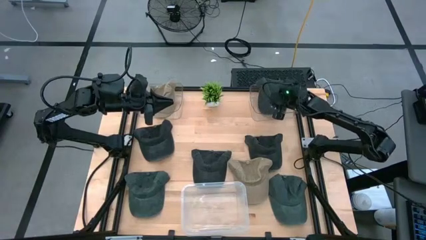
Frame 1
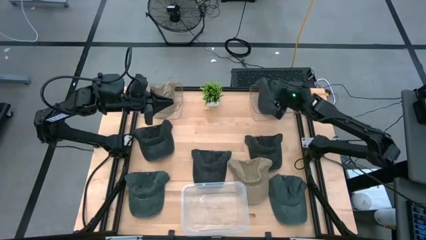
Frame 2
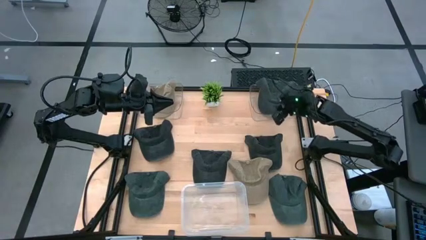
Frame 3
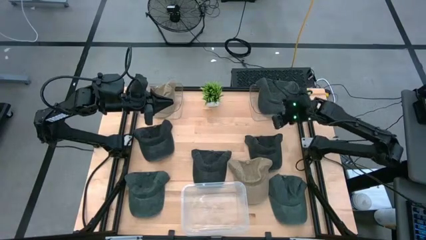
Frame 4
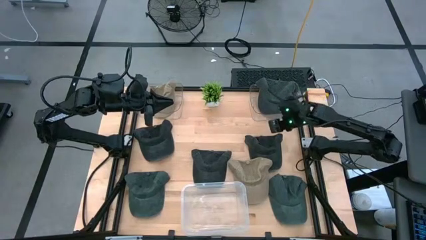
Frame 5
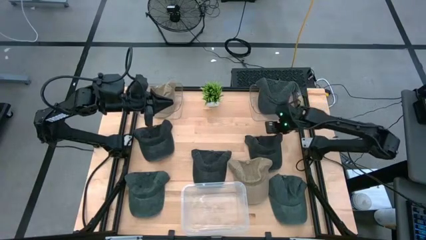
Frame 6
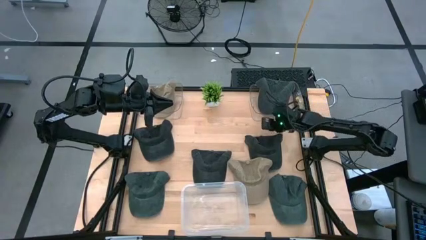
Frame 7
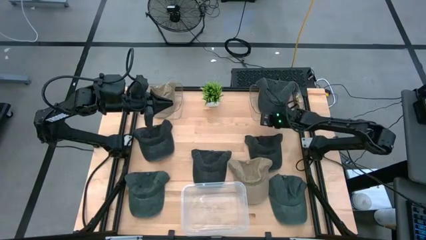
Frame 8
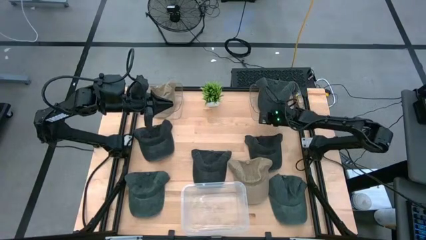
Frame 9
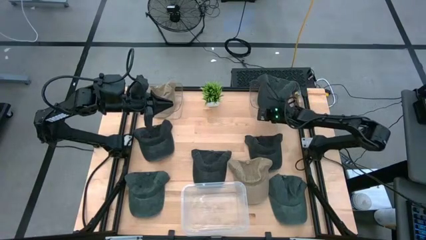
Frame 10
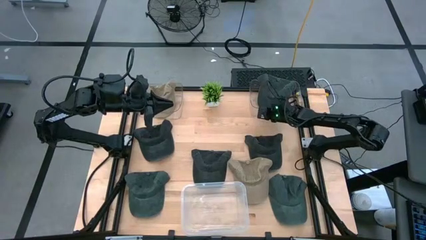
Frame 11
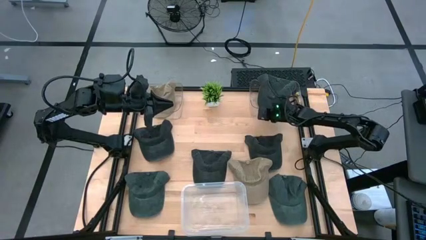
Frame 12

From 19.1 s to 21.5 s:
Task: Pick & Place hat
Adjust the right transparent bin

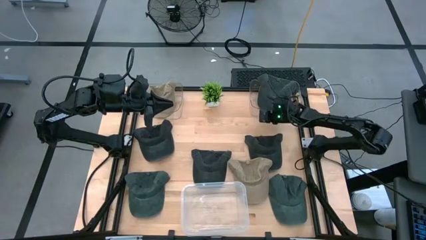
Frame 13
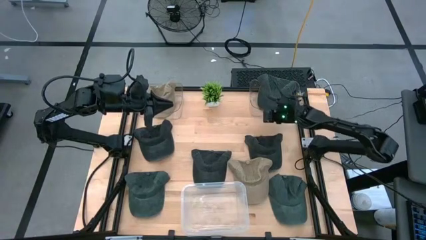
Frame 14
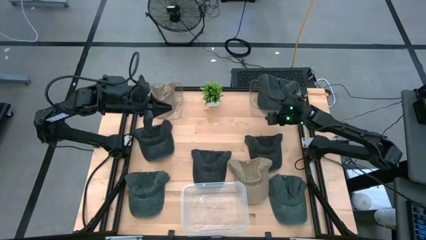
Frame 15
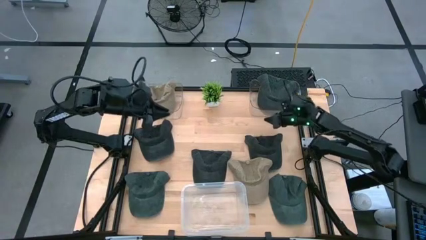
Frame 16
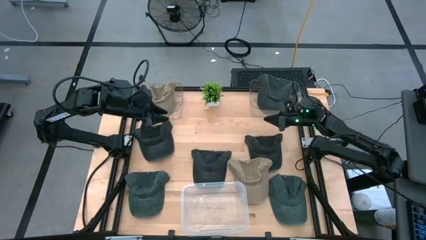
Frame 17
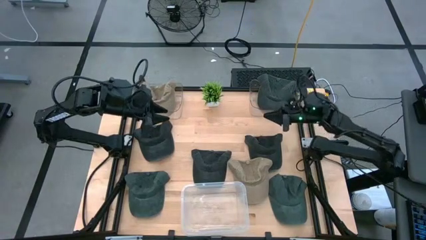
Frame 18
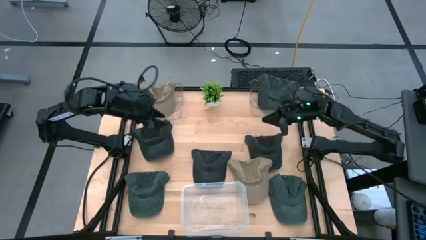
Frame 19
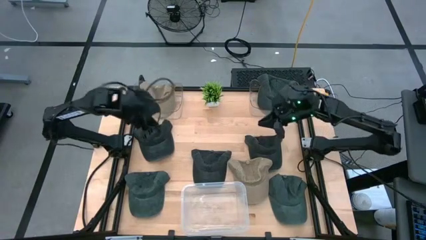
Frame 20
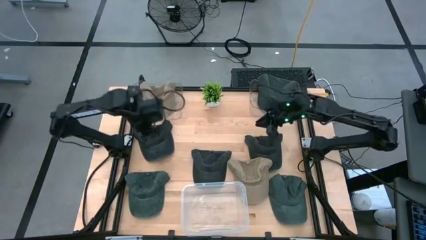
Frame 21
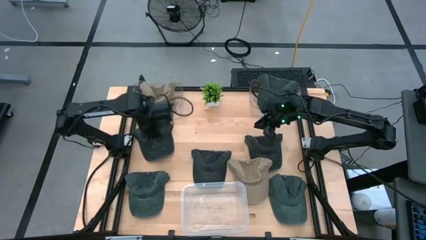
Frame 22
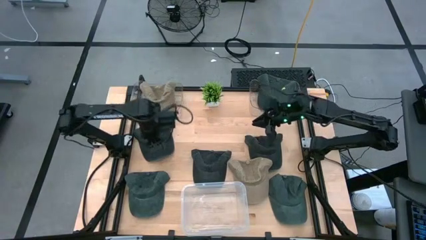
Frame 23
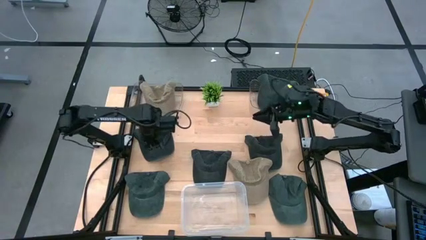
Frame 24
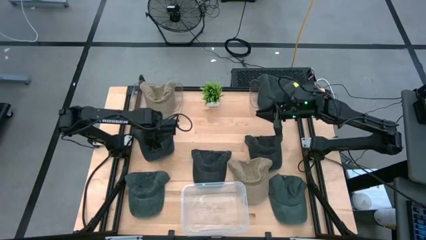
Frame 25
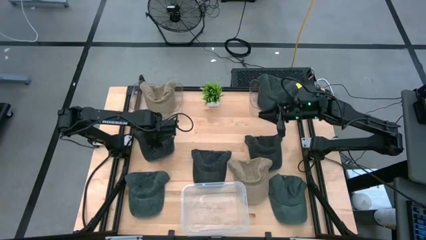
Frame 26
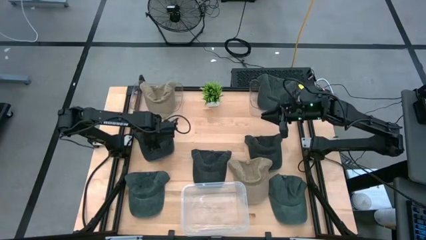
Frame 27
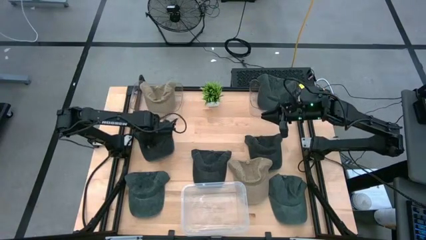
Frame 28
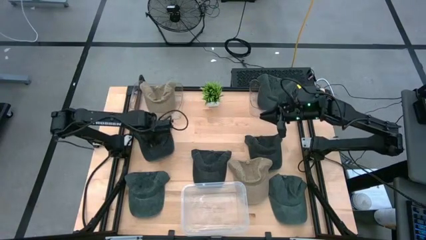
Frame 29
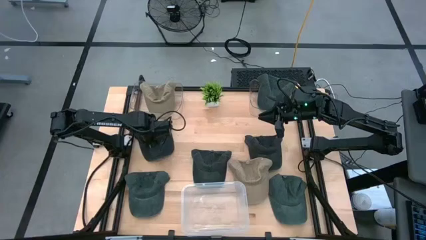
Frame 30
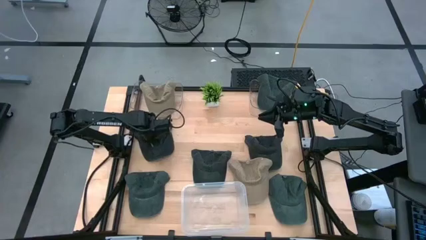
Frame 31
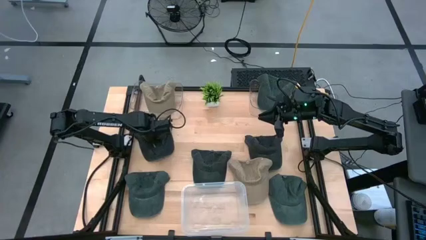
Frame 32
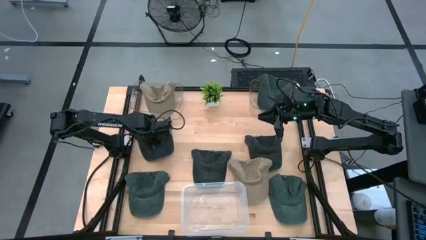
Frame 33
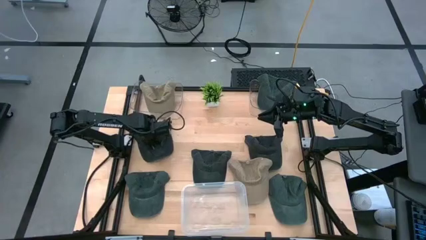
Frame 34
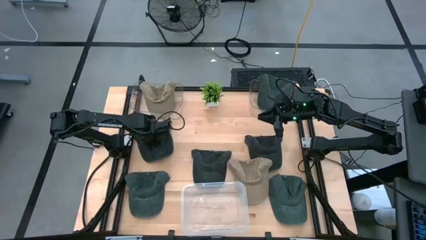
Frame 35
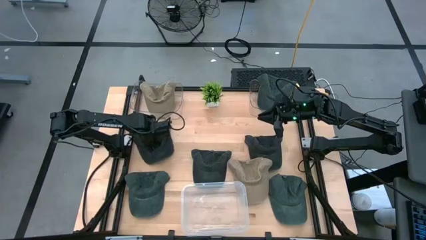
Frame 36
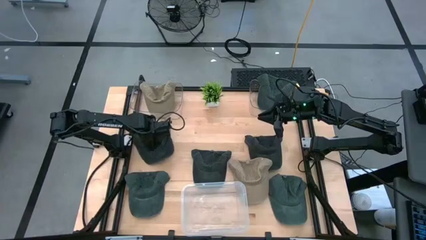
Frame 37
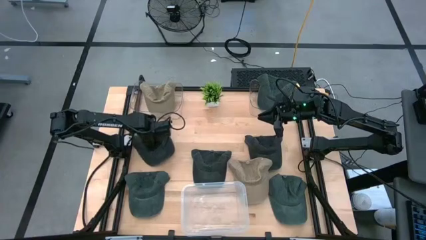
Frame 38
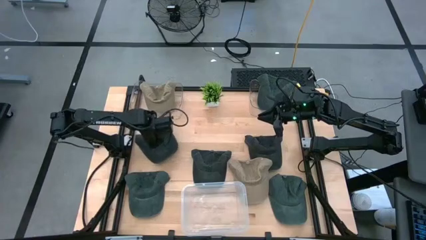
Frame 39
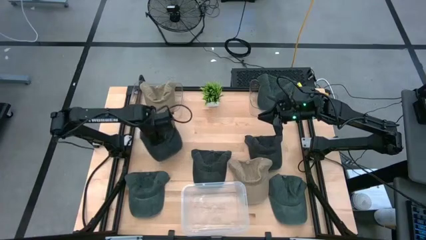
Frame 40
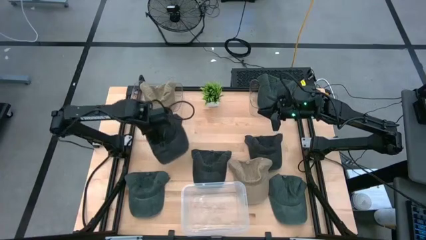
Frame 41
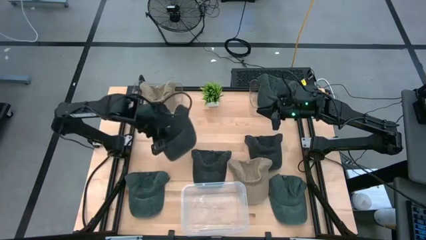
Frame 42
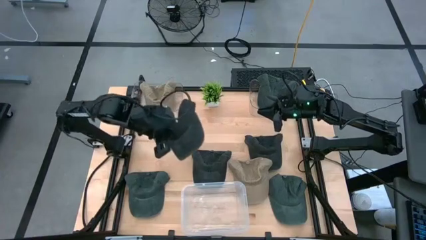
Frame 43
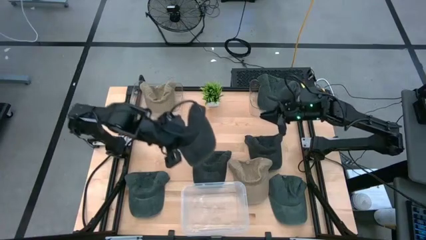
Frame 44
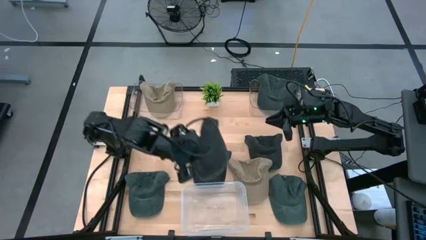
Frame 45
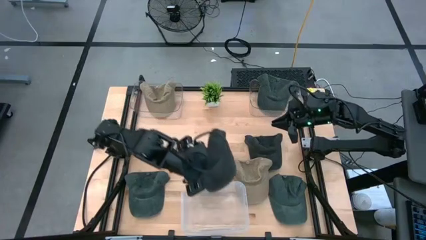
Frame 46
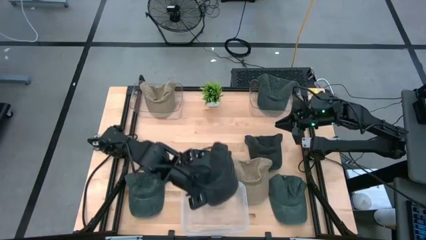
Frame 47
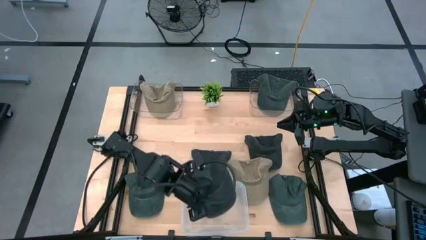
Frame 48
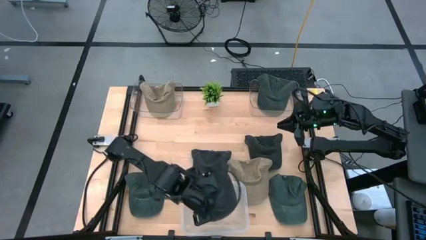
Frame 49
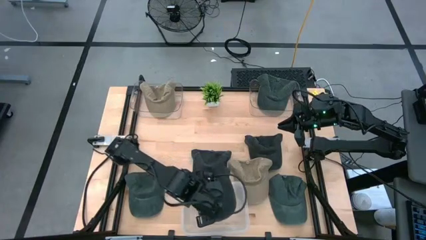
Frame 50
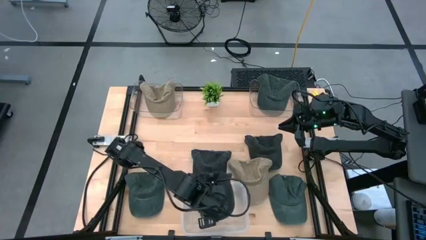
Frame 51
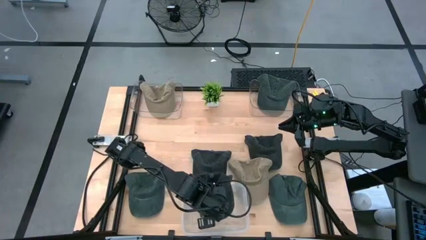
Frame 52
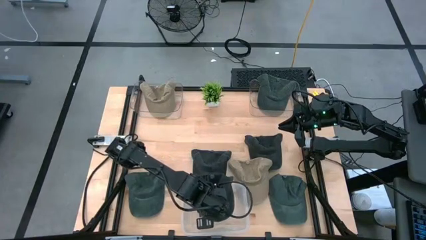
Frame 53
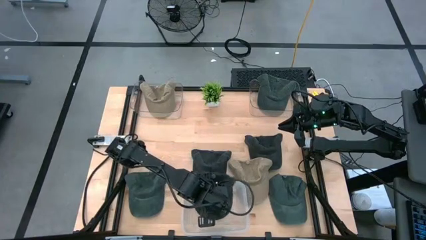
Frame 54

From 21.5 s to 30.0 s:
Put the top left black cap into the white transparent bin

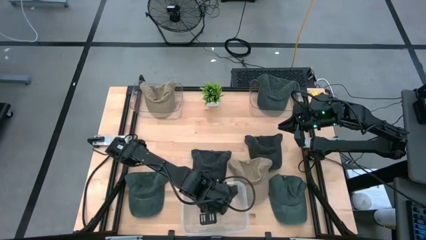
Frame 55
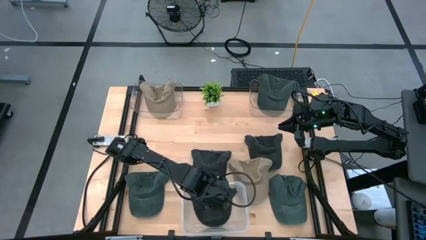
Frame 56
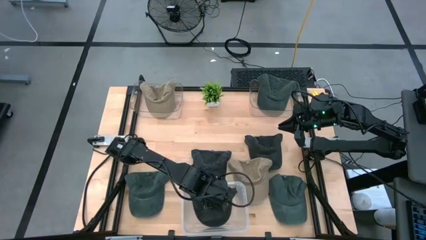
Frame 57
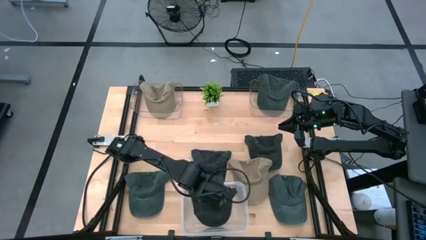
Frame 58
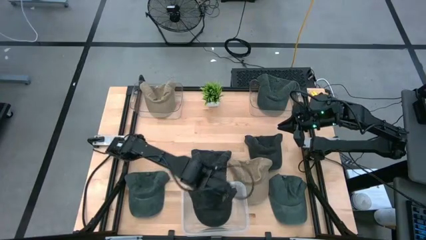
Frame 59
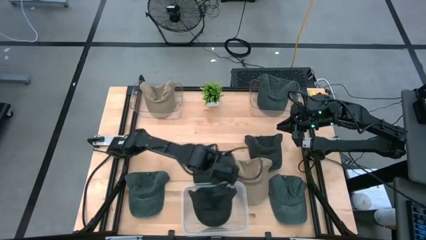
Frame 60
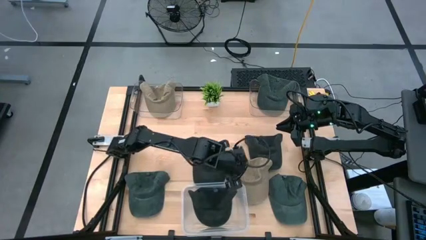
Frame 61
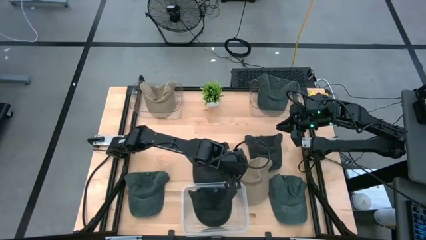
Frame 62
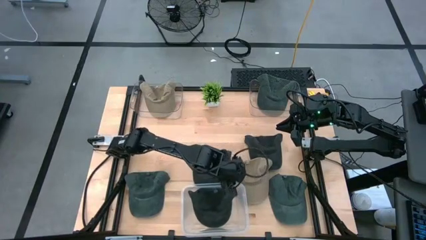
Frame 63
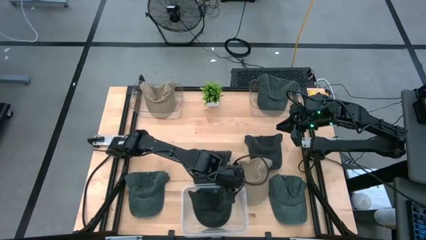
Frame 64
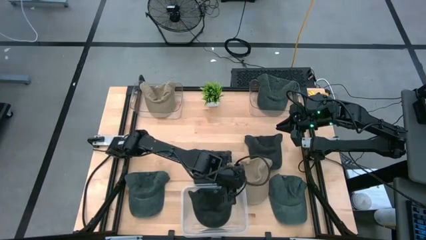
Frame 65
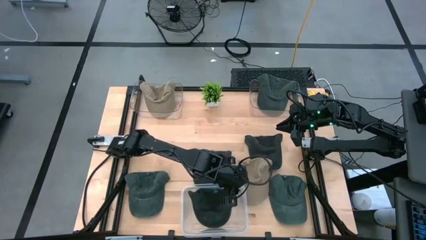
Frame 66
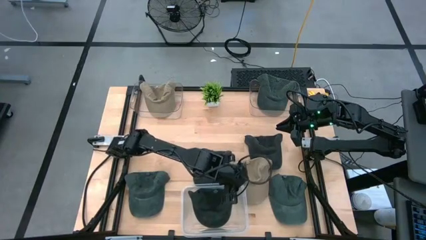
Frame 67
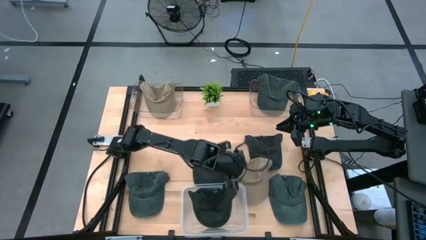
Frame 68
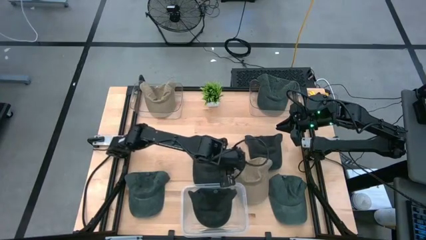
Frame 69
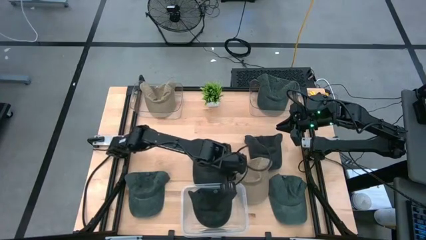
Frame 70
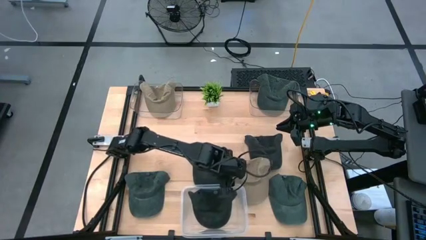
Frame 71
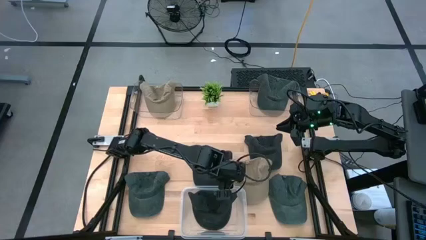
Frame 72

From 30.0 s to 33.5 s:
Adjust the white transparent bin

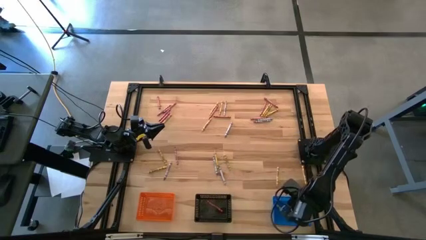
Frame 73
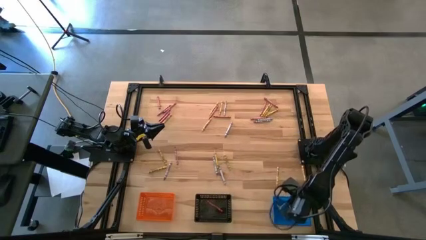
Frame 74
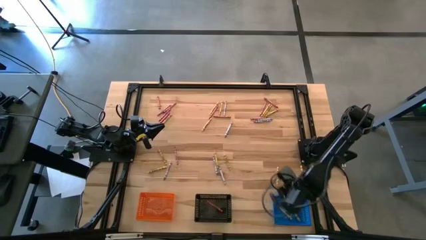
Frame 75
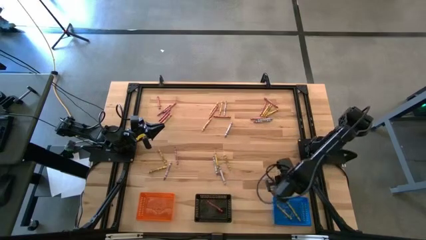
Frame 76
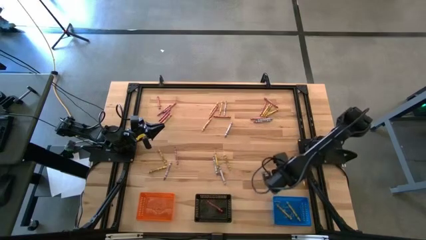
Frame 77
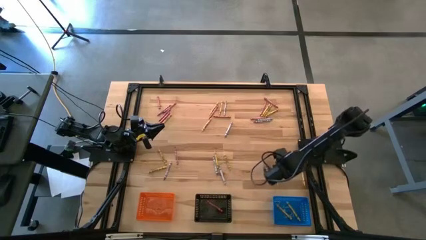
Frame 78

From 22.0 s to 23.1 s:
Task: Sort crayons
Put the yellow crayon into the blue bin
